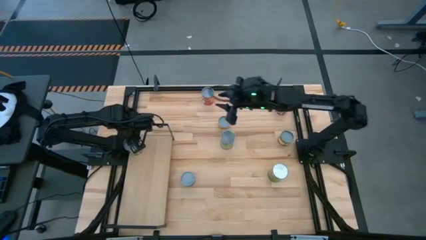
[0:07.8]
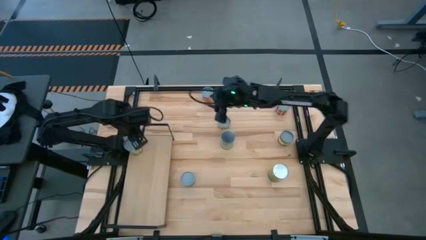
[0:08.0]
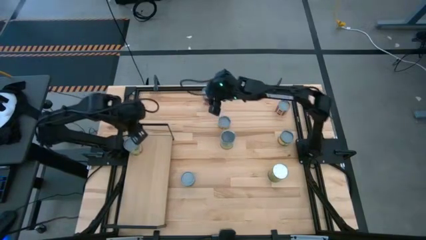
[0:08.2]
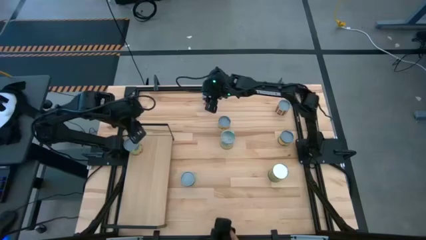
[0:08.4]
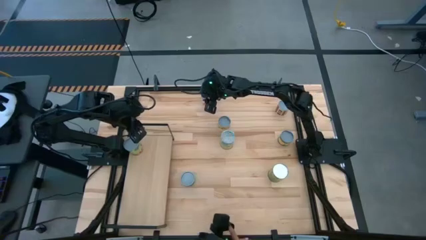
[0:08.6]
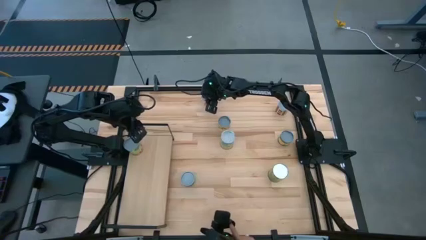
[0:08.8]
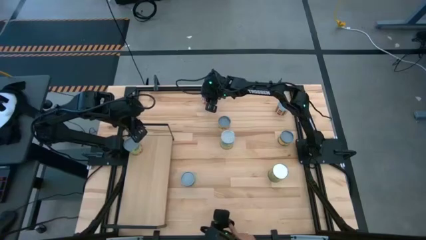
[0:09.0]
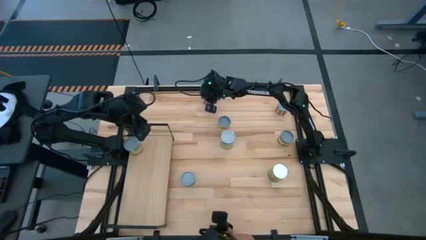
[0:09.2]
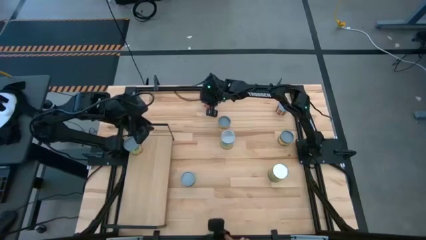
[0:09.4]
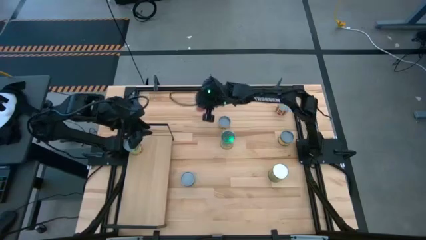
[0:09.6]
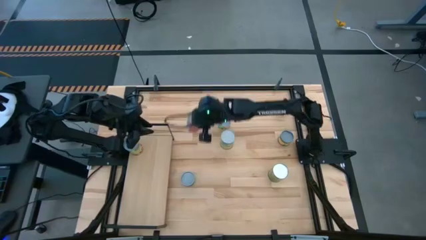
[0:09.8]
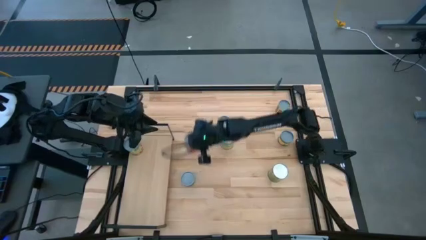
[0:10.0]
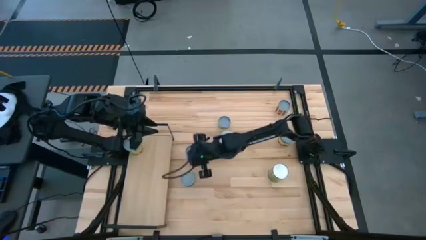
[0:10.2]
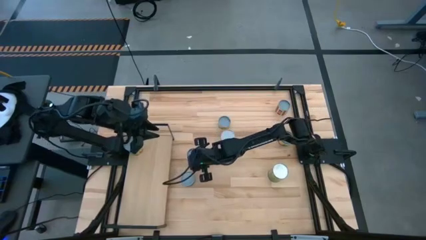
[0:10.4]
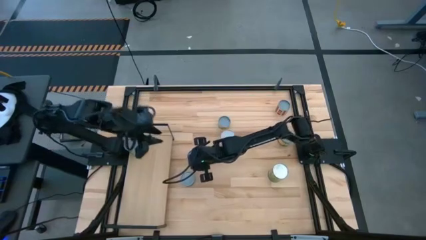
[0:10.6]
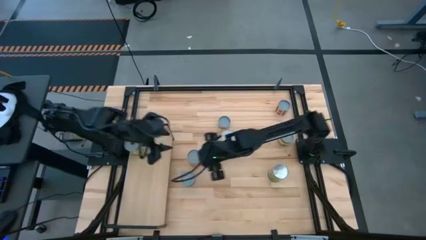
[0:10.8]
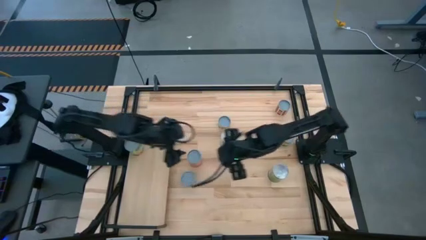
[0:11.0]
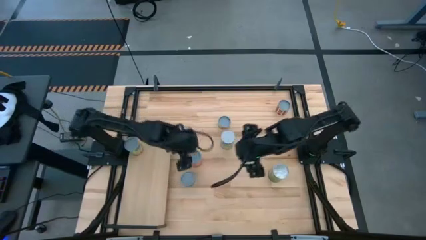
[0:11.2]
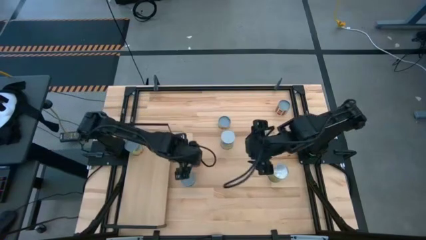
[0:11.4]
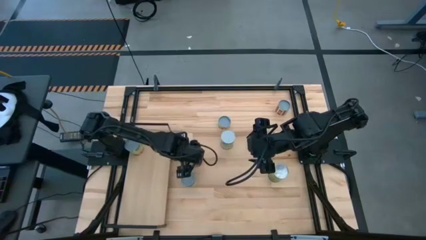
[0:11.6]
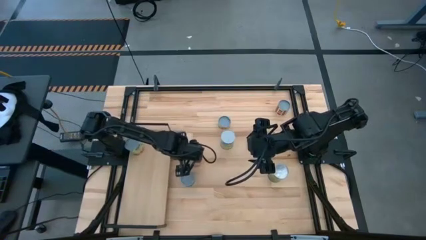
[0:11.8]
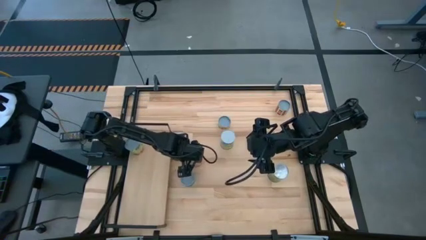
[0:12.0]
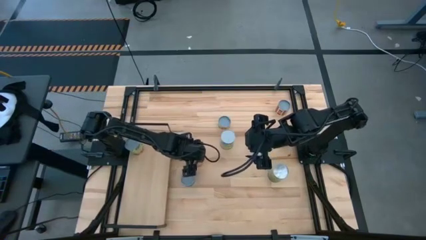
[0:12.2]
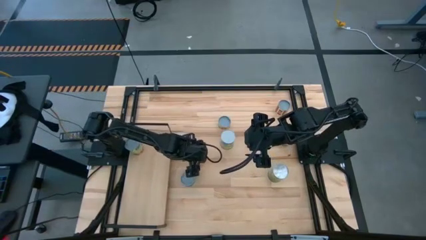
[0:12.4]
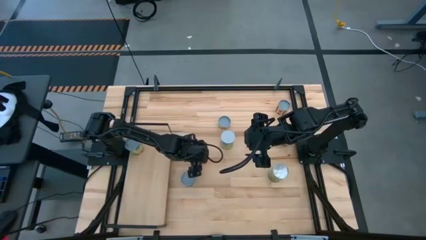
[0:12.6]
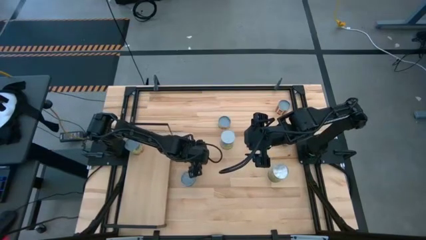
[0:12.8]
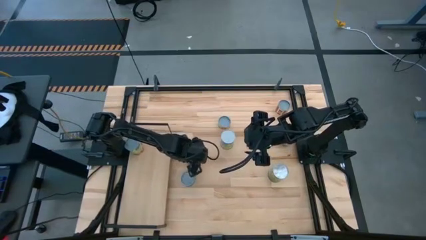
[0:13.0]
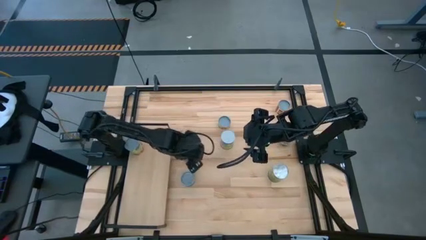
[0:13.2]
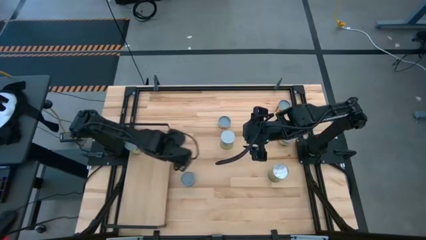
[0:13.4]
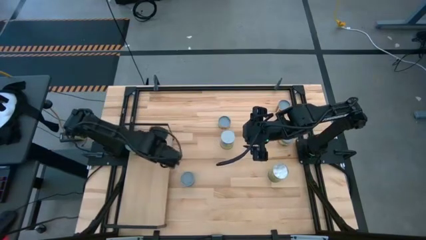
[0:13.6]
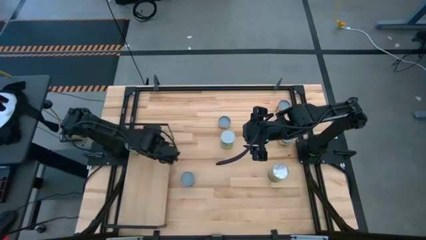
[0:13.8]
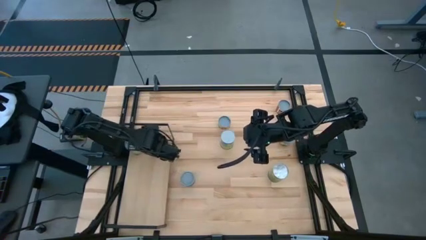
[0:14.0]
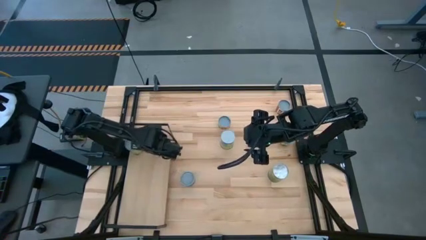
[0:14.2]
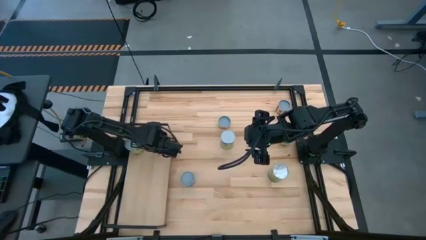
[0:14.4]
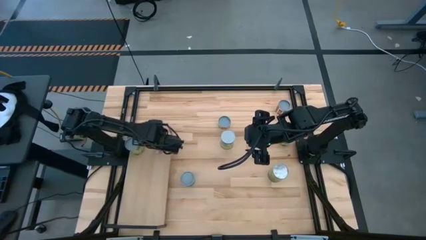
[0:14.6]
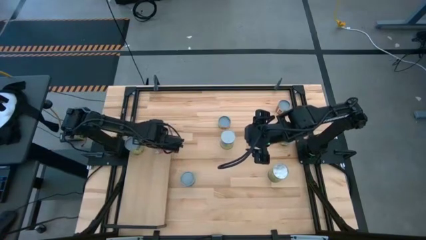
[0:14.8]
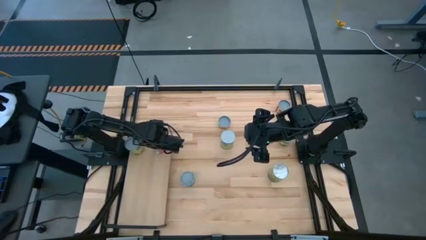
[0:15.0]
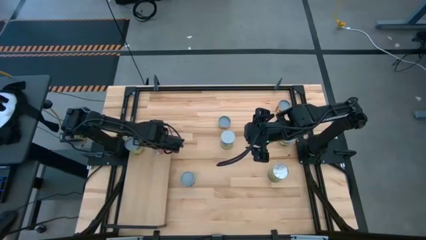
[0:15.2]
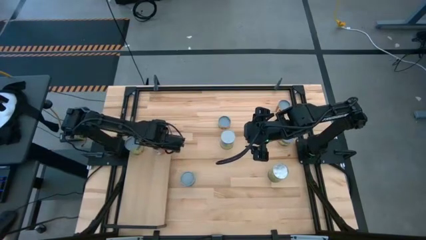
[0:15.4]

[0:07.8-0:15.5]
Task: Pick and place cans onto a shelf
Put the canned mixed fruit on the shelf

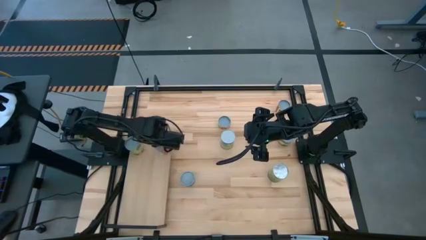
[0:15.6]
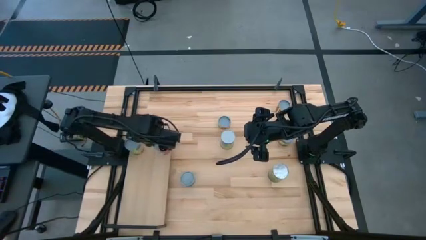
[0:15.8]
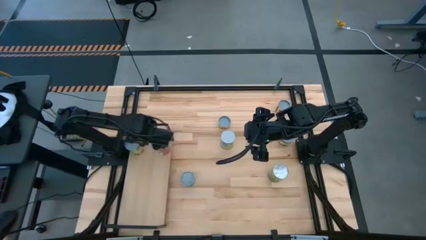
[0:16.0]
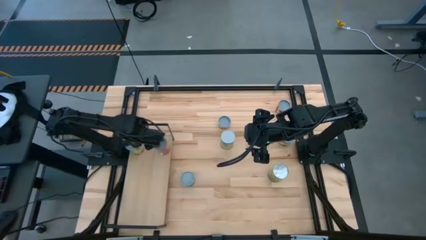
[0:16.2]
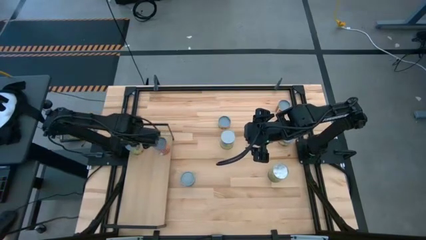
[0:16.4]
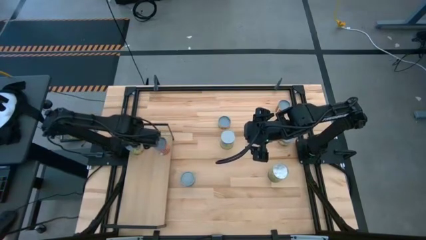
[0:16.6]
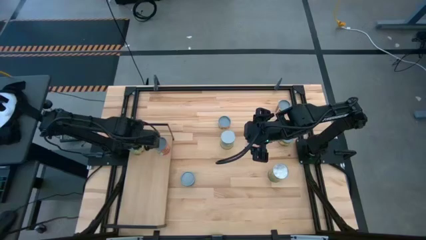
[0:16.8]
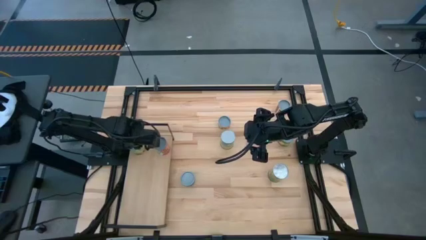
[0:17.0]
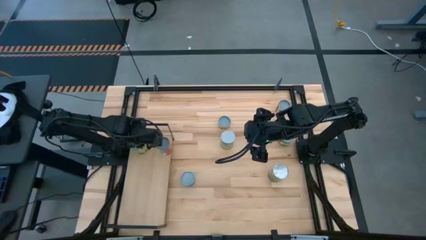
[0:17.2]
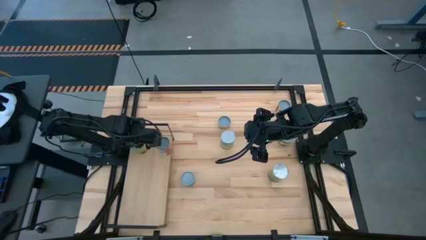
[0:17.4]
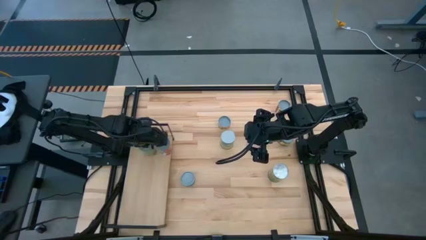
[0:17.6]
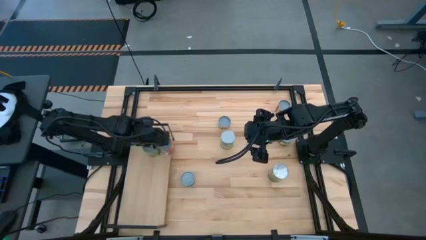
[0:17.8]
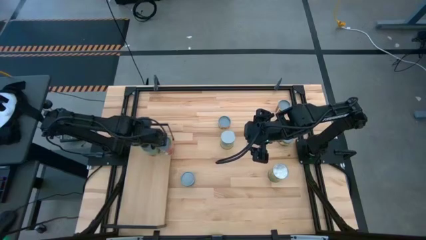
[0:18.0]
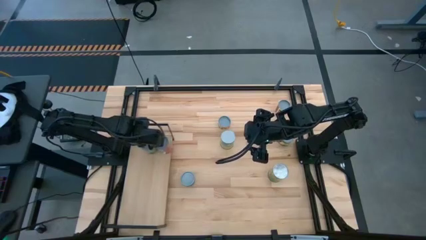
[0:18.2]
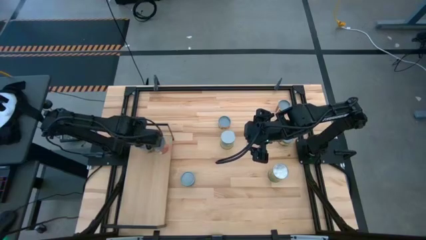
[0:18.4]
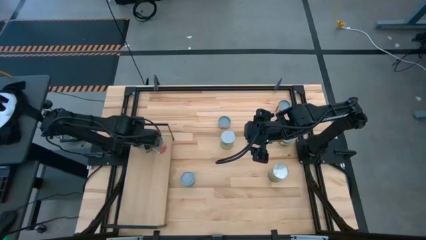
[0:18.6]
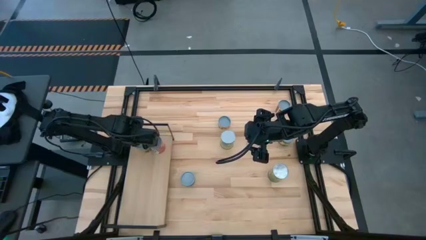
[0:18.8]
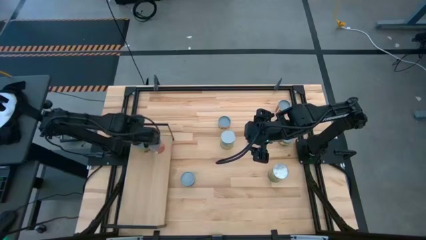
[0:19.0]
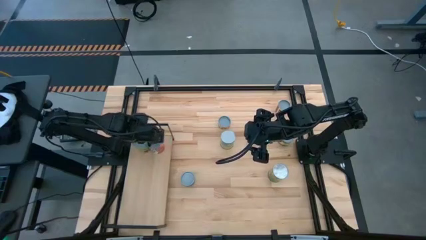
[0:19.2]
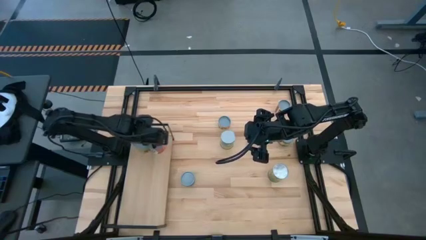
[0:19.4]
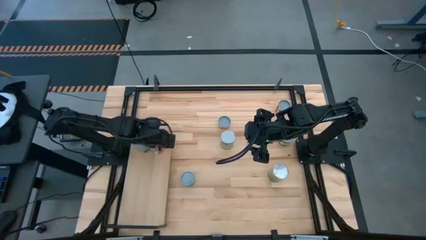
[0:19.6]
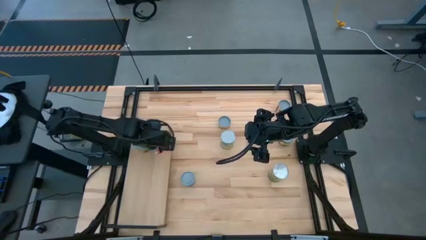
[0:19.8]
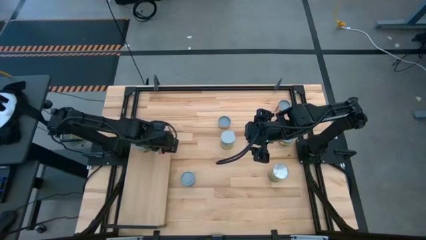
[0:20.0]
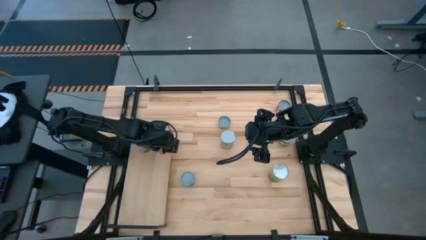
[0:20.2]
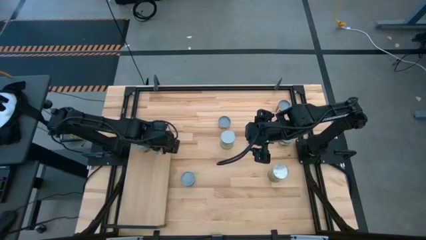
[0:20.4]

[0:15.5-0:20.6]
Adjust the cans on the shelf

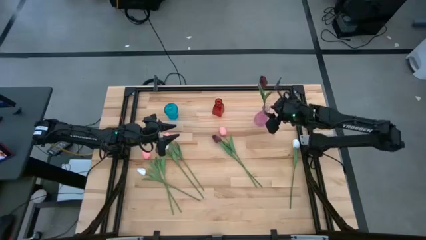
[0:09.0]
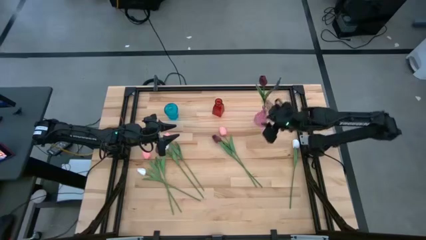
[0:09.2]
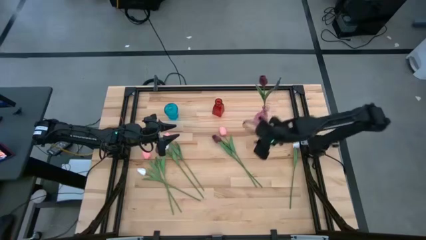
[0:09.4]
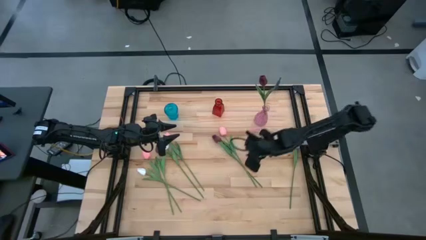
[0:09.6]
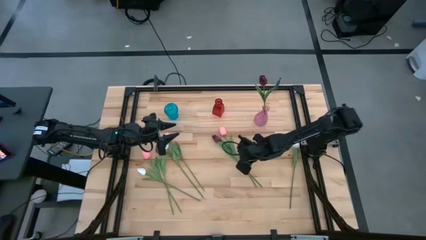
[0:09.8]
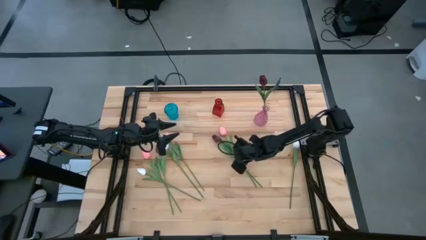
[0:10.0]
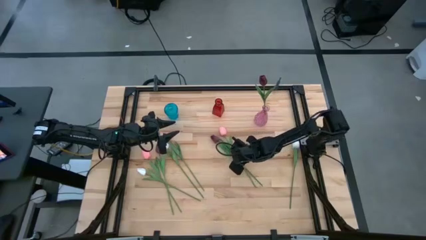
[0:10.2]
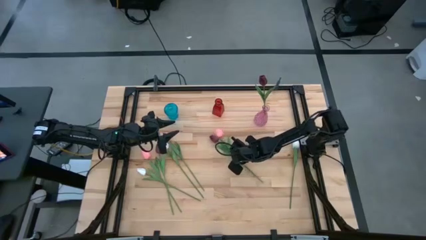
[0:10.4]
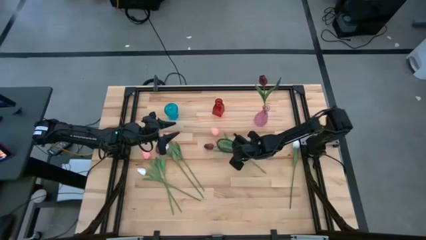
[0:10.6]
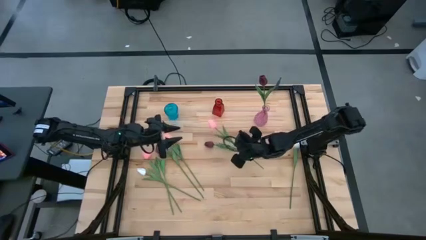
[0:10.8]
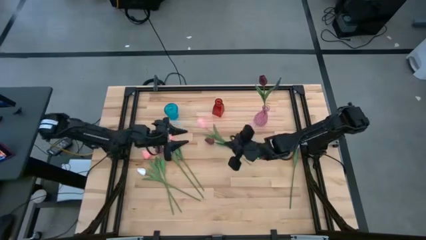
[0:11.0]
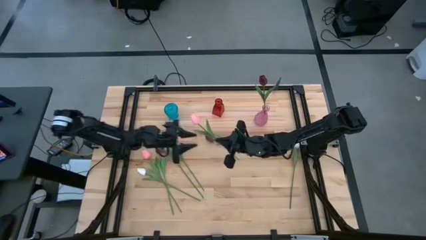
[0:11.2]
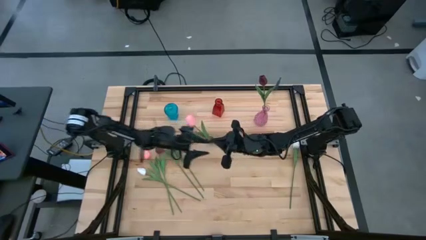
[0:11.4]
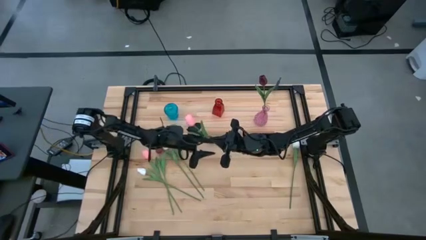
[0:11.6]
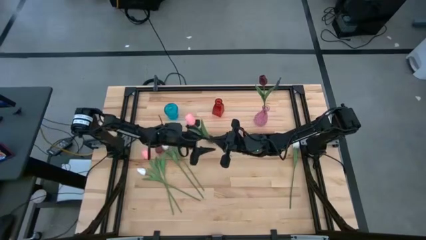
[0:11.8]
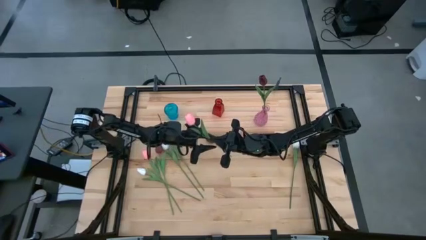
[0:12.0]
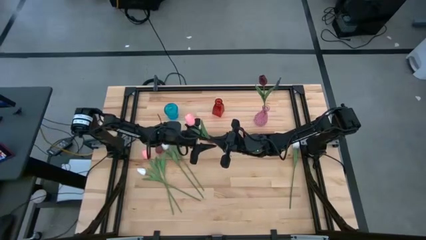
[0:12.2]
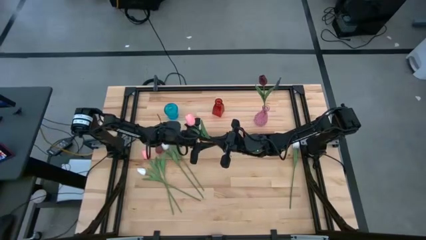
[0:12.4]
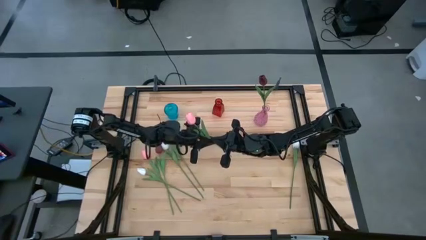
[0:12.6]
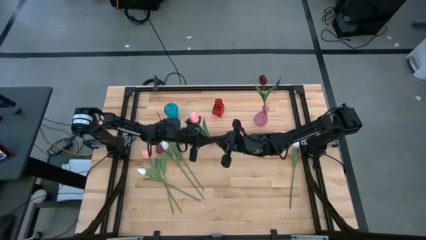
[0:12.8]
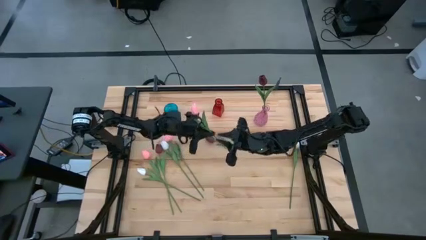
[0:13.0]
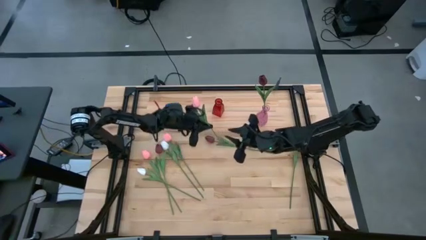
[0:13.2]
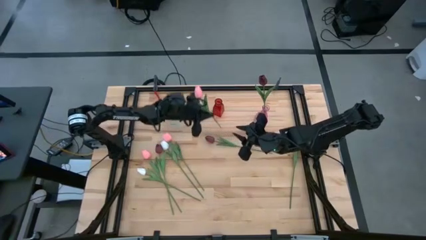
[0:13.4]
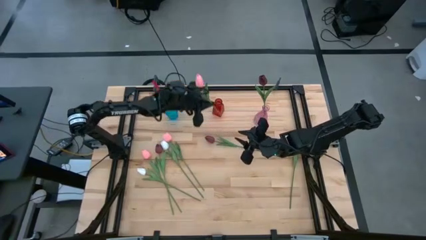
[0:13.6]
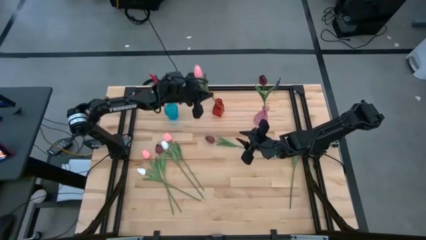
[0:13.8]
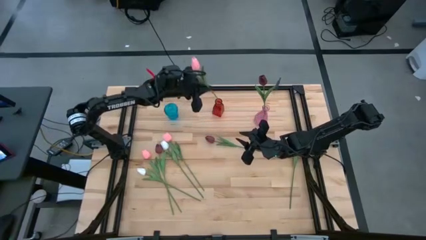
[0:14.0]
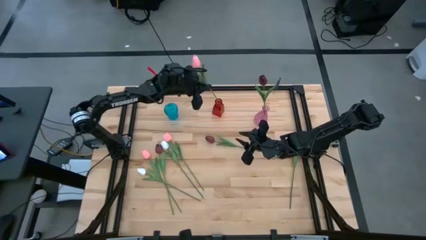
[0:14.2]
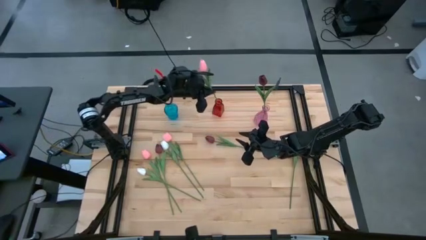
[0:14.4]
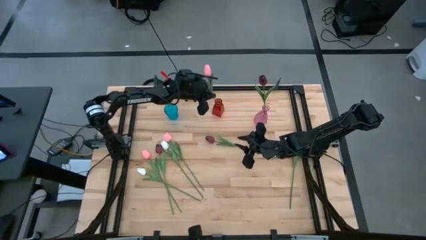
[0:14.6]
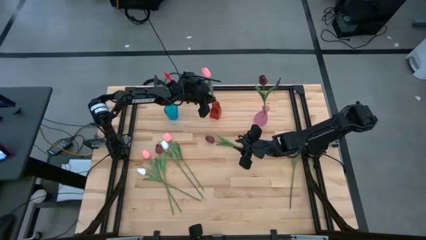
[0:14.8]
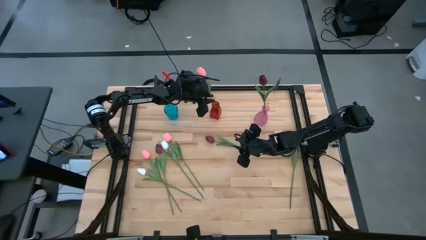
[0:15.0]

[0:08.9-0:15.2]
Task: Sort flowers into vase by color
Put the right pink flower into the red vase
